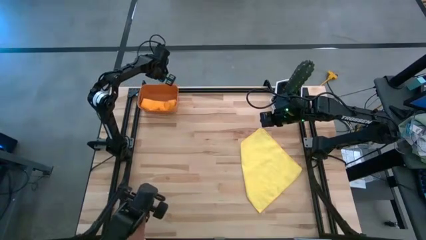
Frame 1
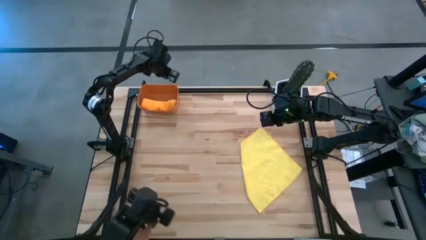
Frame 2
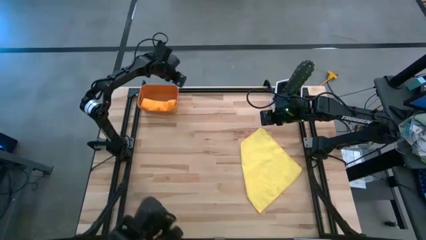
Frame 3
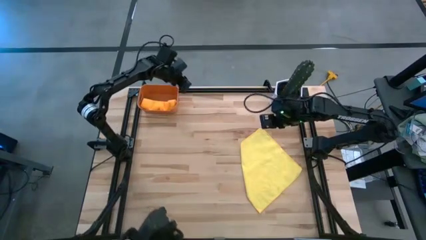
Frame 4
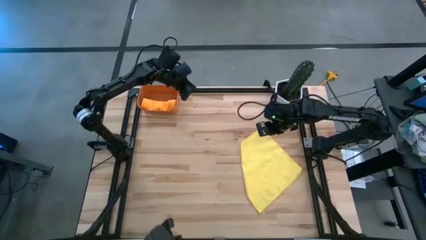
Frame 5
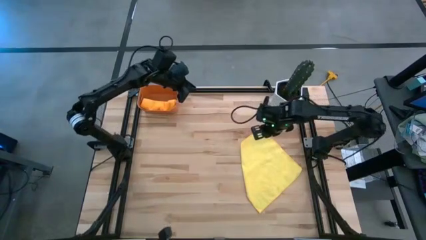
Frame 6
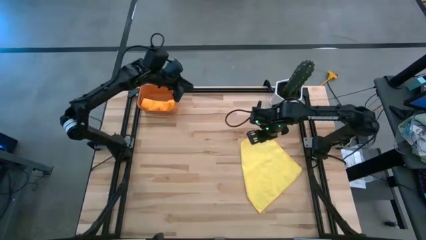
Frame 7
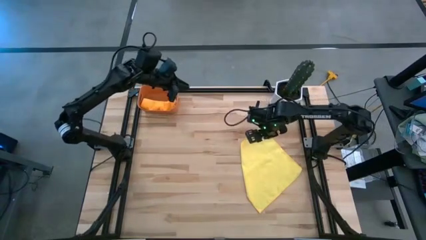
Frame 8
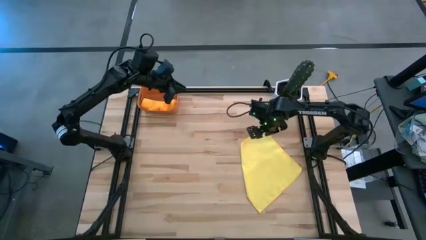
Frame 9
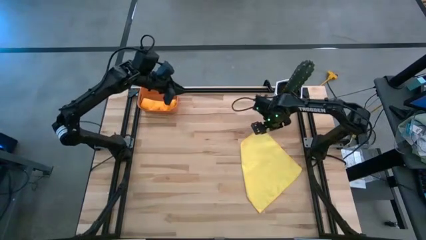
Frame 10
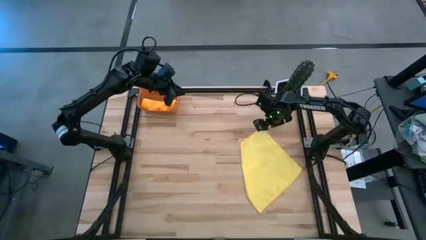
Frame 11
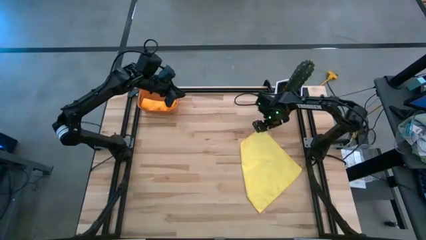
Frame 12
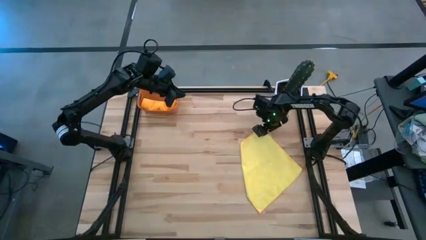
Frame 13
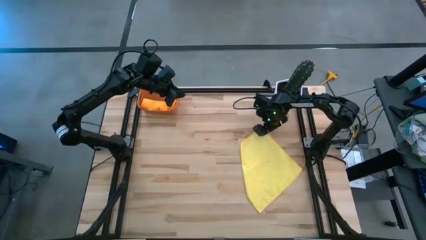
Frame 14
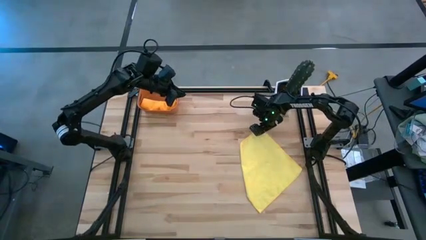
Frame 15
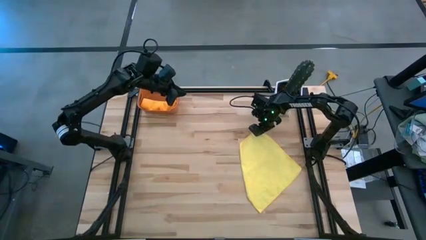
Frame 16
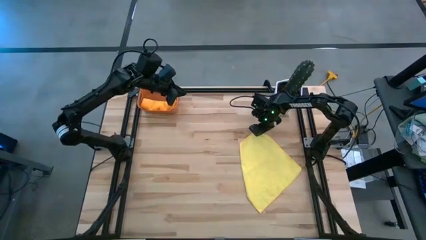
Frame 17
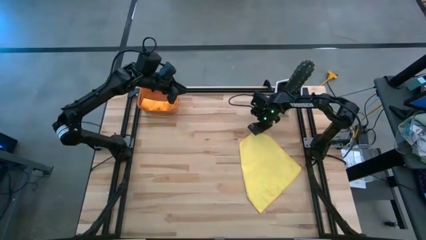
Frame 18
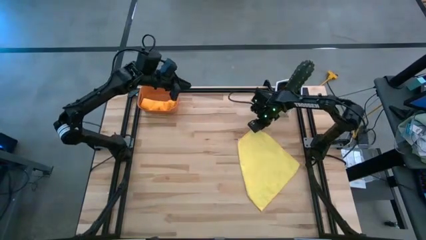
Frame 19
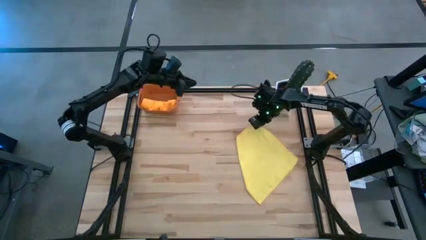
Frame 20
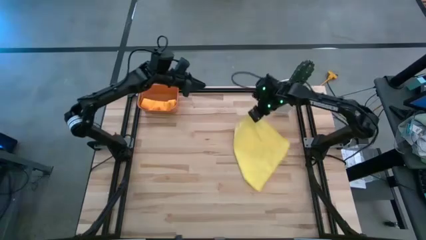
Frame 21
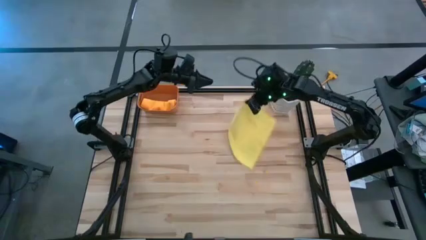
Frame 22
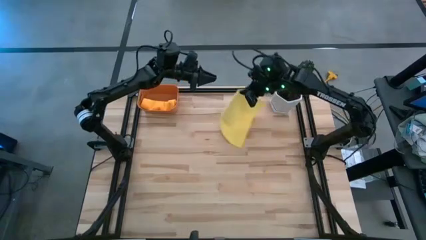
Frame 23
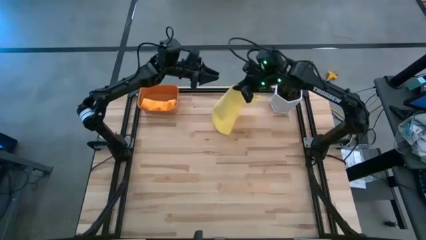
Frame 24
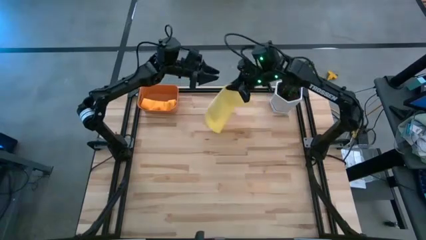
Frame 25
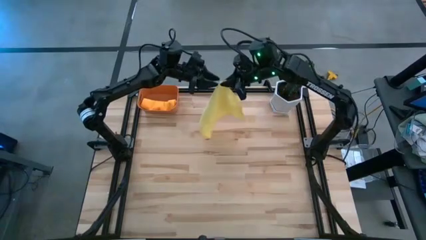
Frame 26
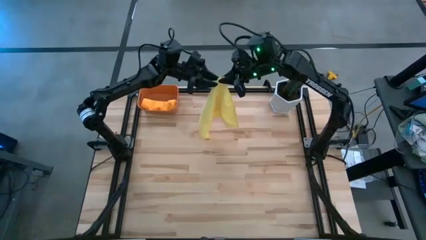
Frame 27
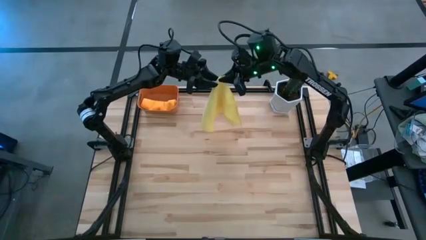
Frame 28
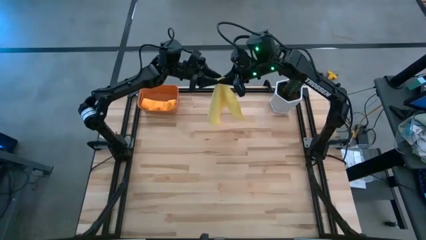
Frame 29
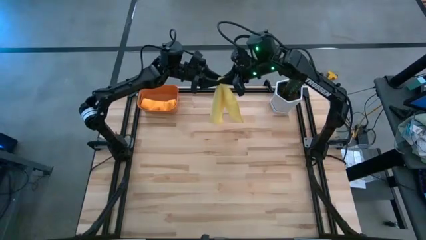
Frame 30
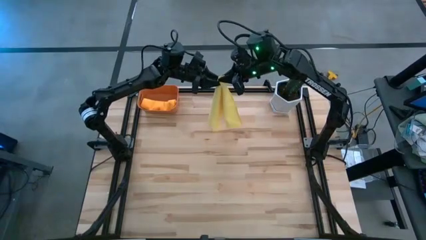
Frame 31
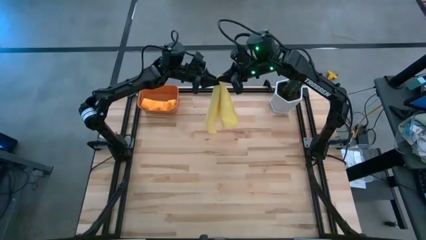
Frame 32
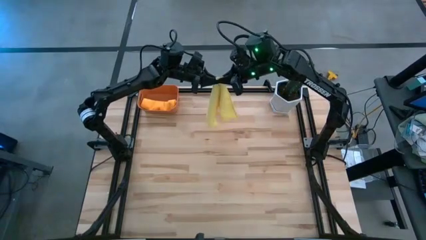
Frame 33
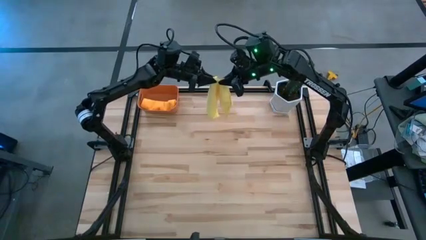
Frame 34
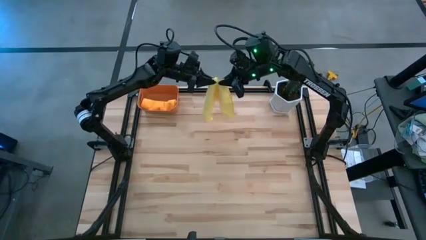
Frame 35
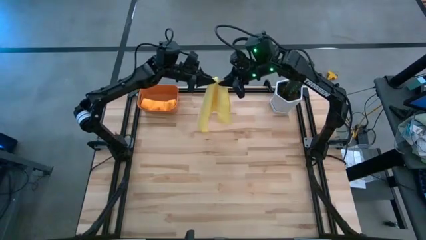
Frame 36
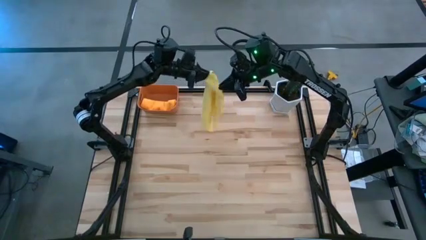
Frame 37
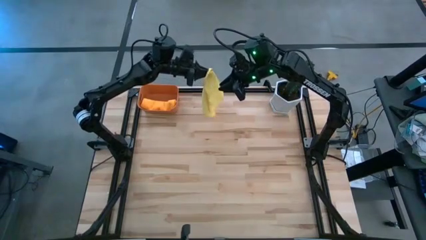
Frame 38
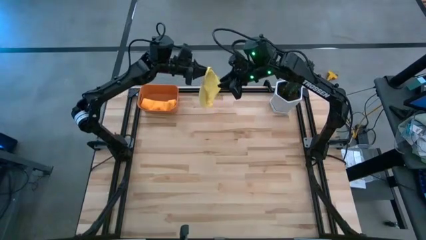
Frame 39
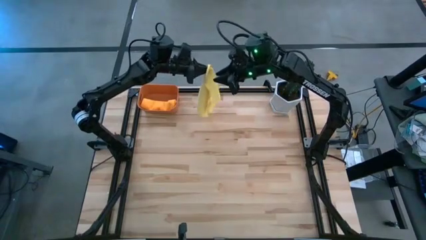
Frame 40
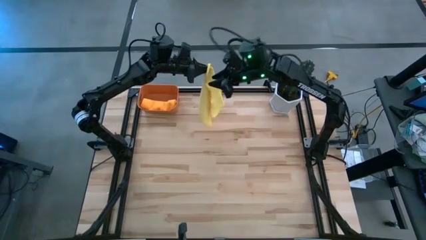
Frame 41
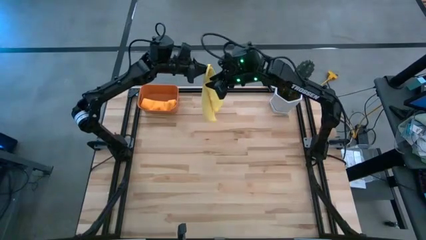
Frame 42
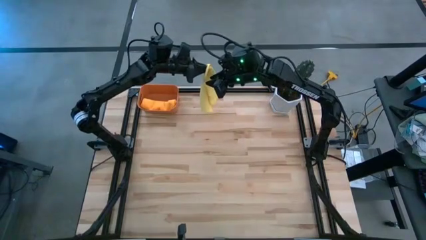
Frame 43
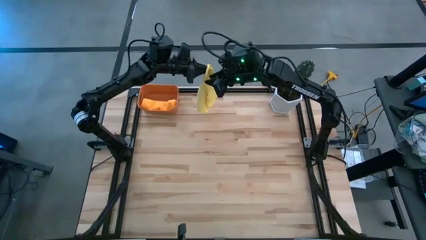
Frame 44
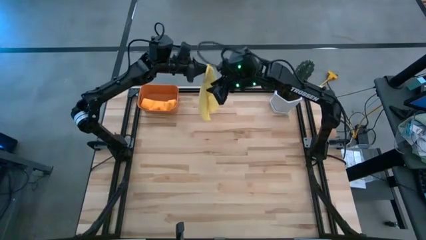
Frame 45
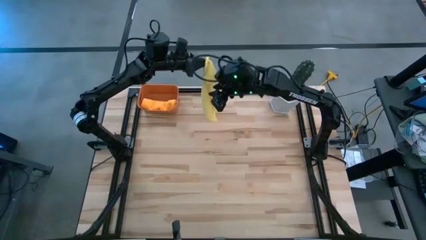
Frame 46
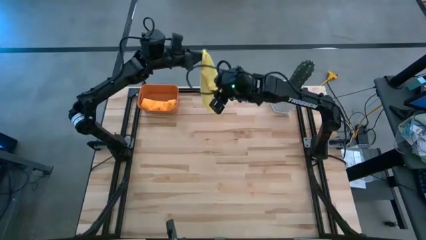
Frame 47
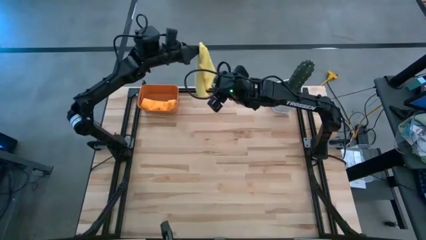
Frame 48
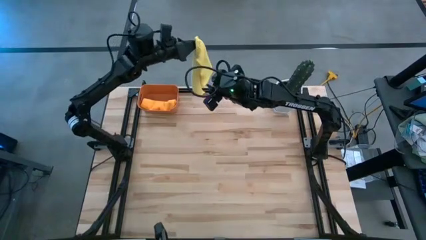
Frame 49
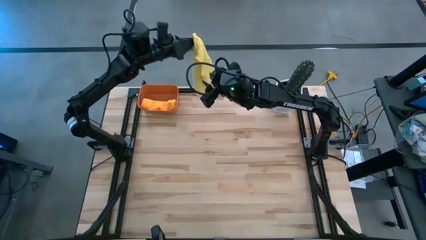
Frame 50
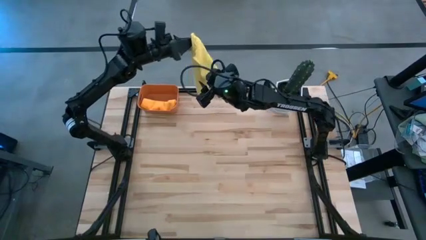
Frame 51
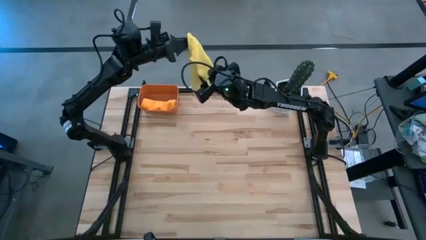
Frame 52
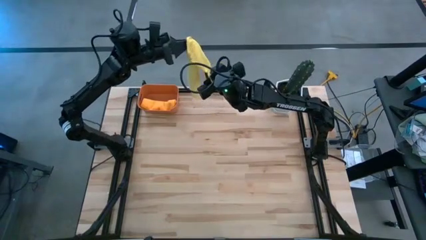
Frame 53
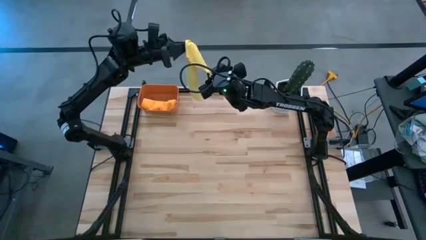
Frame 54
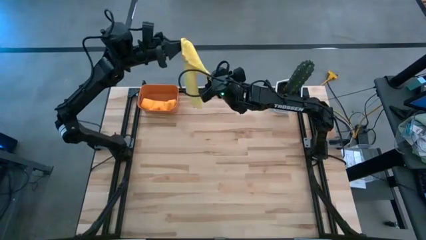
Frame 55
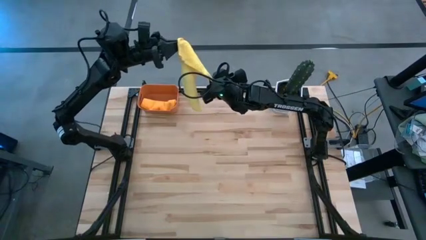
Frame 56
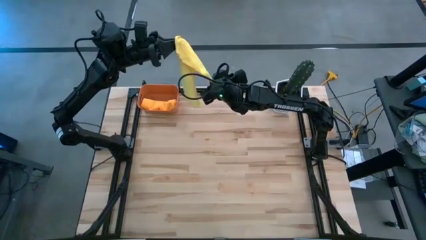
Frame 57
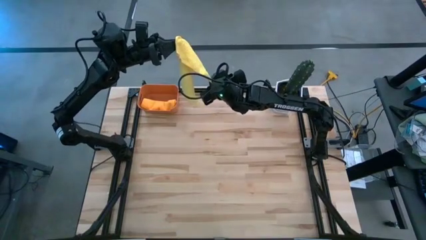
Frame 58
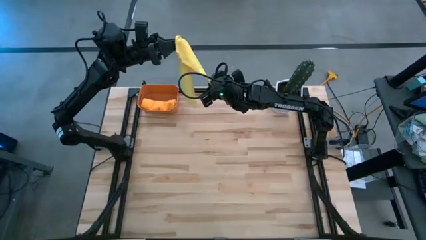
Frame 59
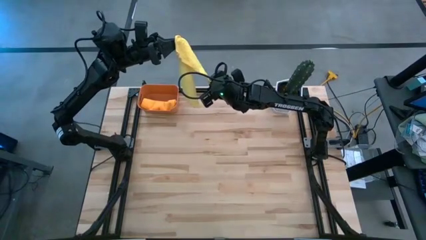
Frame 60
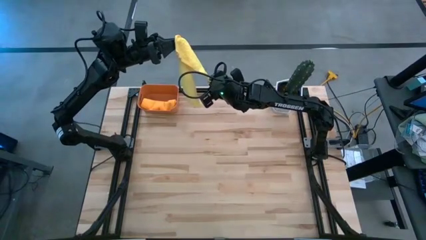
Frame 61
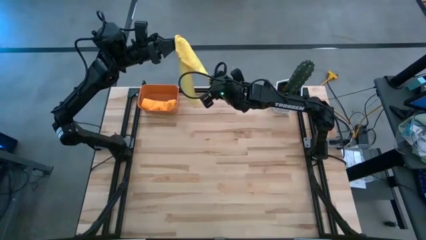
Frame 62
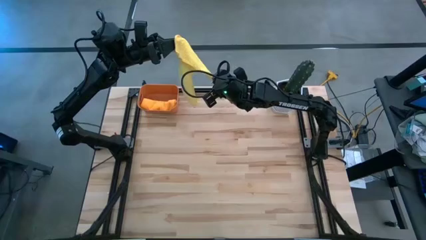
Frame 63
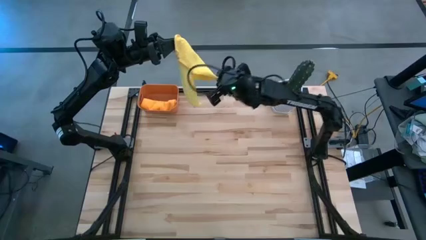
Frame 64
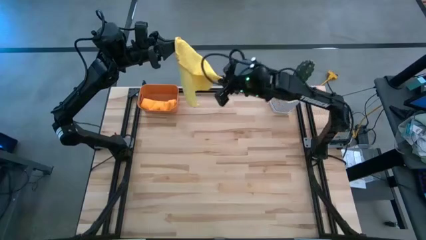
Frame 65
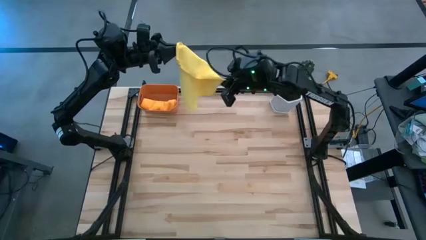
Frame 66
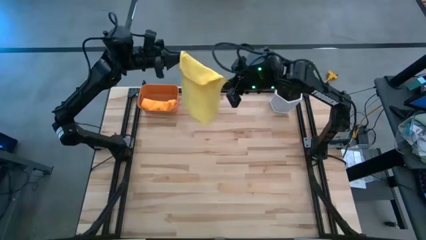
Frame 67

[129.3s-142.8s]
Task: Roll microfiber towels into tight, uniform cylinder then place into a basket
Fold the yellow towel
